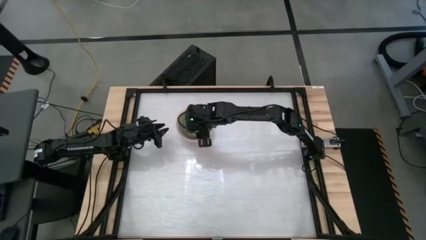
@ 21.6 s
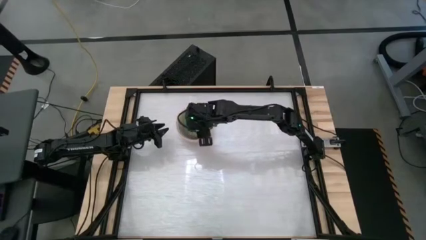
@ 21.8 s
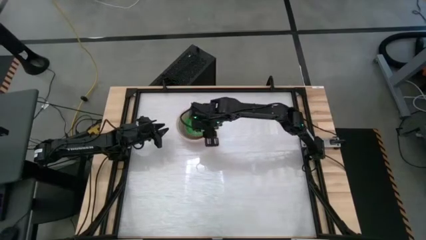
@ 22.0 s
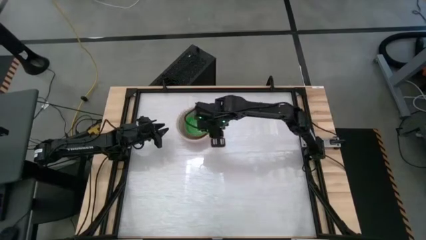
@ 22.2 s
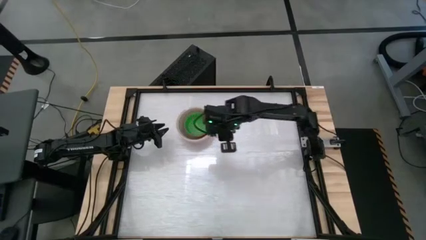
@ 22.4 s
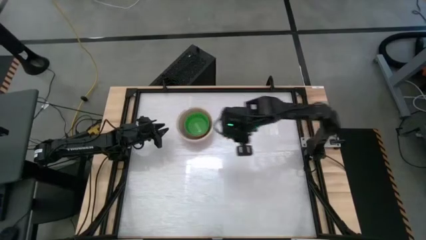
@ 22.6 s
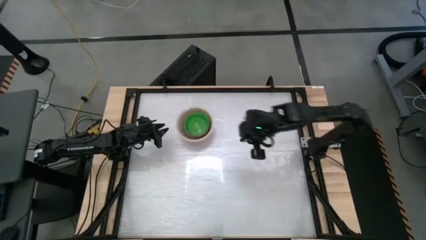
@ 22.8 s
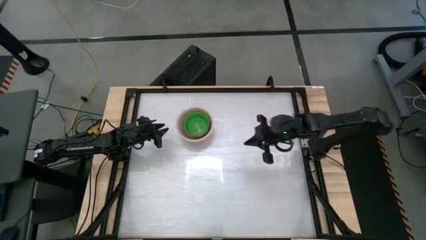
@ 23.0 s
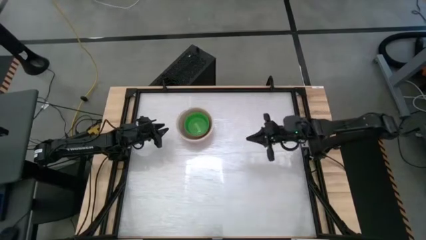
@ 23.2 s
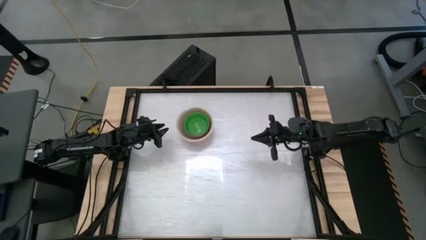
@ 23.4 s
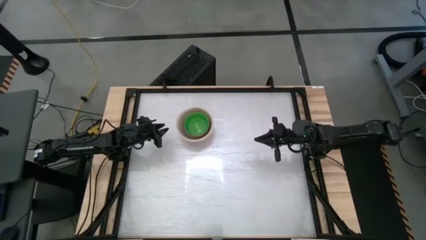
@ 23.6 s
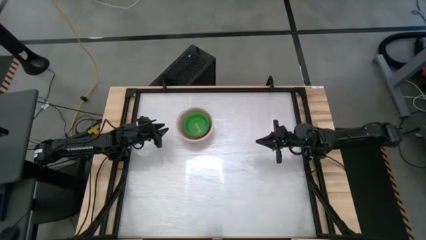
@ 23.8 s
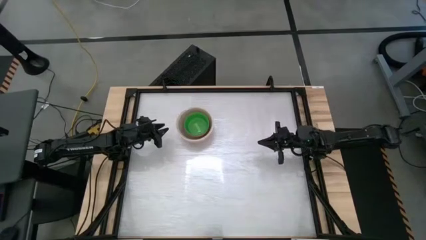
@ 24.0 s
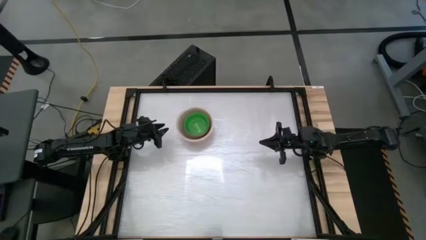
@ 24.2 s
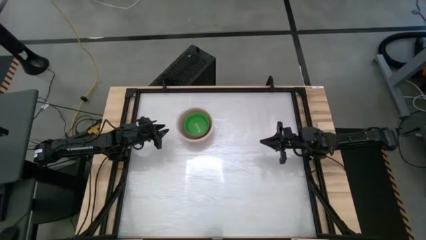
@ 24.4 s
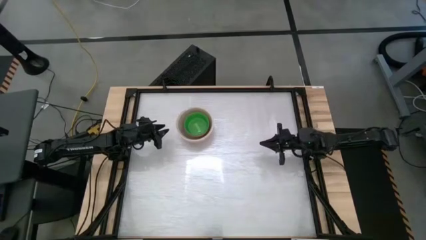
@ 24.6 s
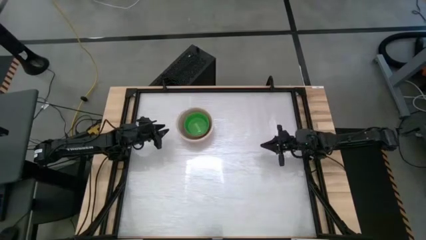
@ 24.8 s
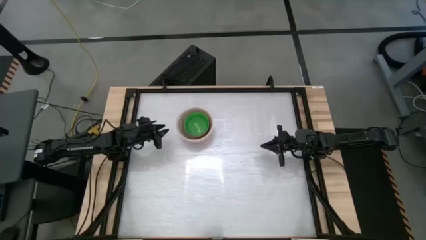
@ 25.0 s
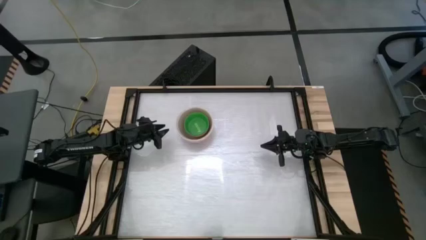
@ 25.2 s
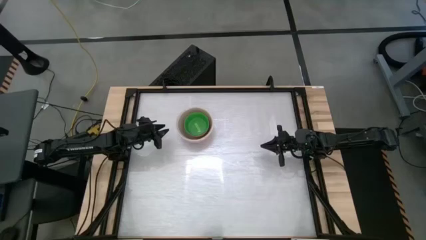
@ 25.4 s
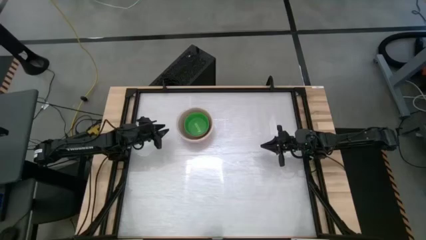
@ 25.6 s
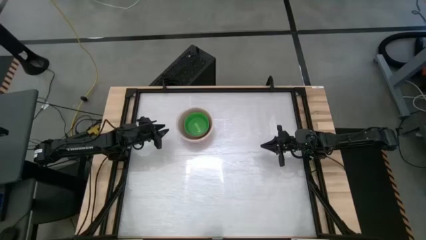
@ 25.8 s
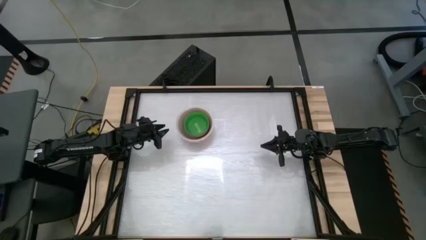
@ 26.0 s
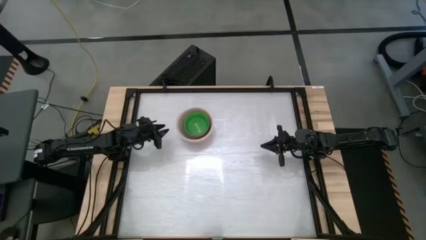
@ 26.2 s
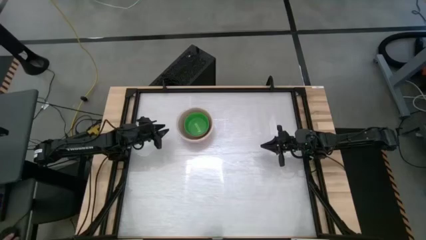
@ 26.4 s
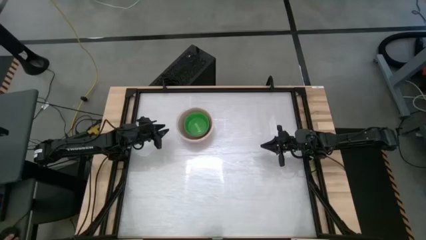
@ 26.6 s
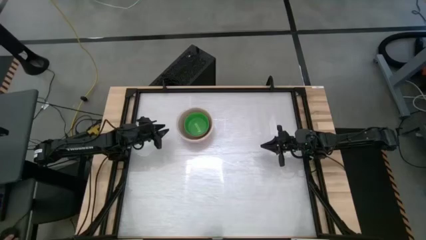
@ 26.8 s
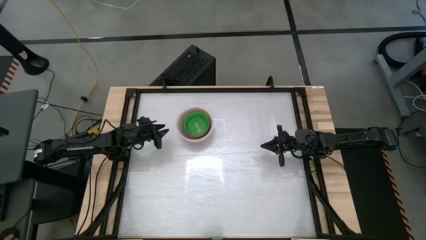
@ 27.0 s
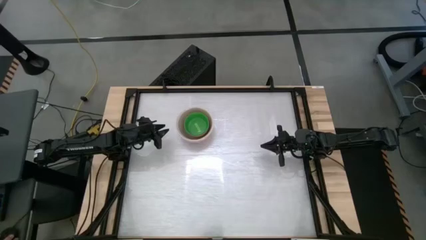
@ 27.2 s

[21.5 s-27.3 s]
Return to Home Position

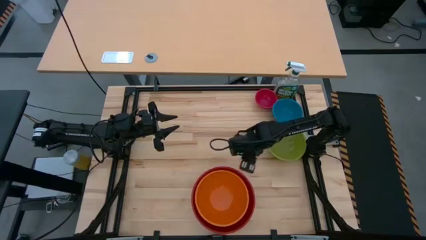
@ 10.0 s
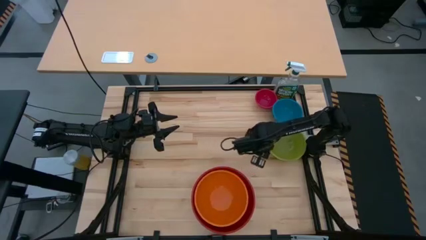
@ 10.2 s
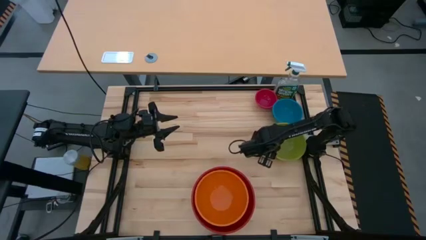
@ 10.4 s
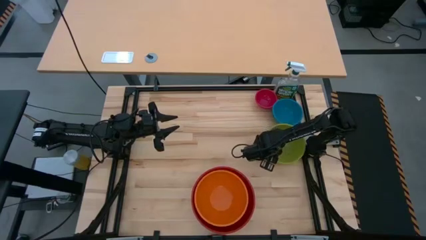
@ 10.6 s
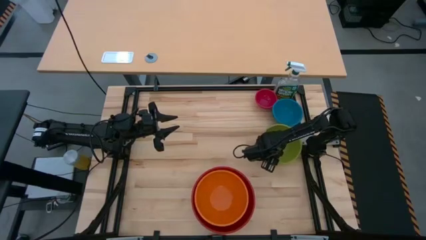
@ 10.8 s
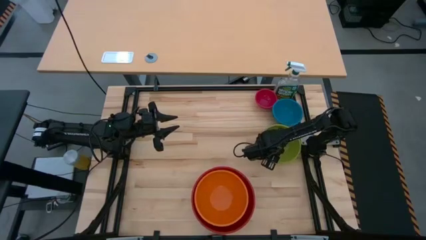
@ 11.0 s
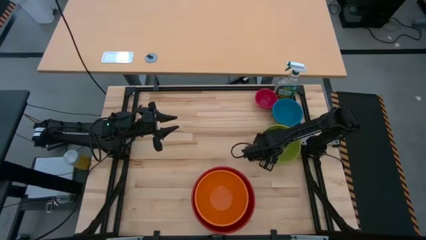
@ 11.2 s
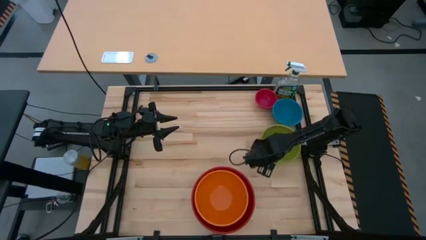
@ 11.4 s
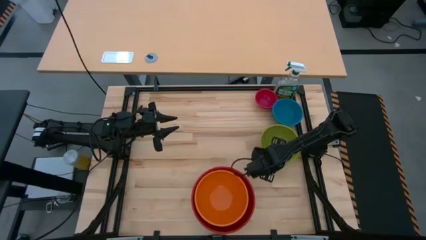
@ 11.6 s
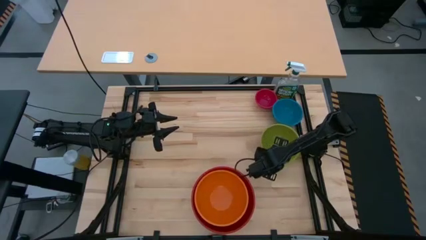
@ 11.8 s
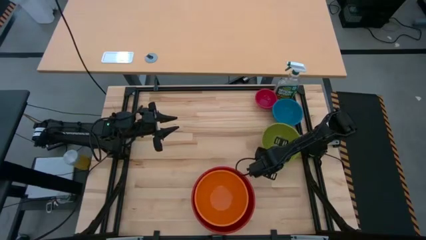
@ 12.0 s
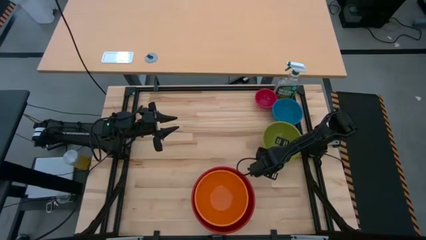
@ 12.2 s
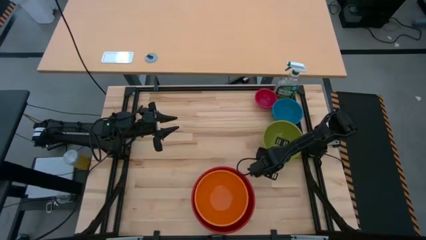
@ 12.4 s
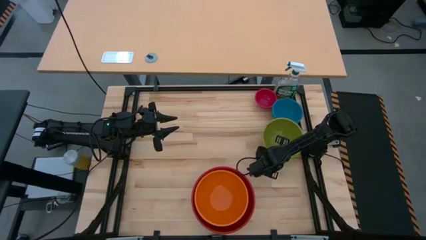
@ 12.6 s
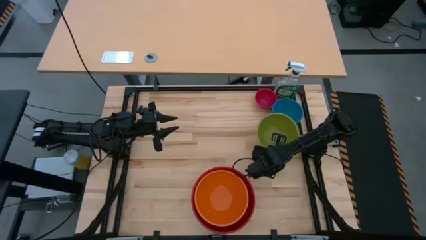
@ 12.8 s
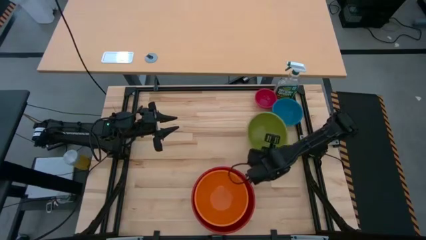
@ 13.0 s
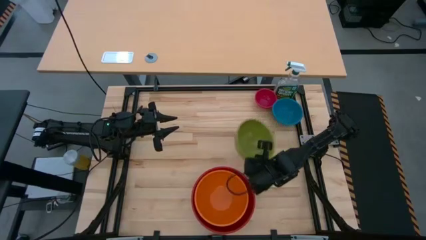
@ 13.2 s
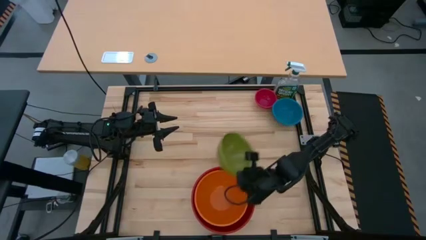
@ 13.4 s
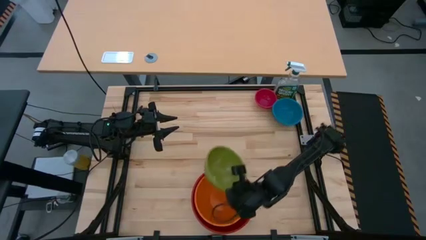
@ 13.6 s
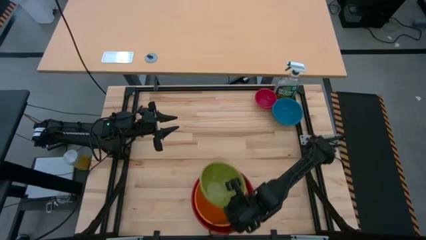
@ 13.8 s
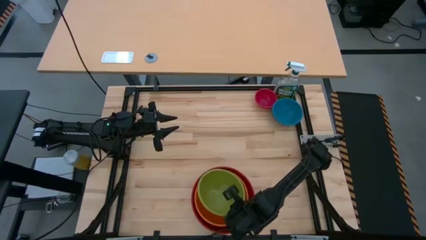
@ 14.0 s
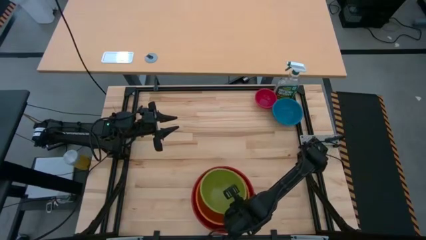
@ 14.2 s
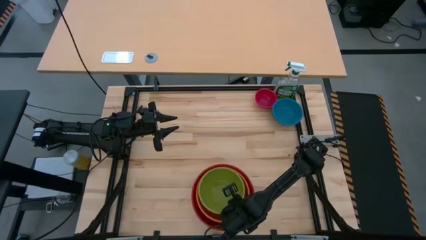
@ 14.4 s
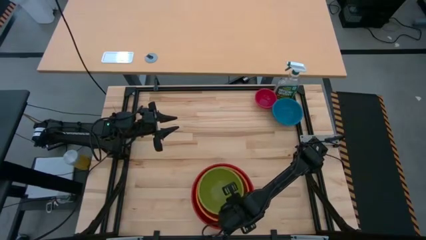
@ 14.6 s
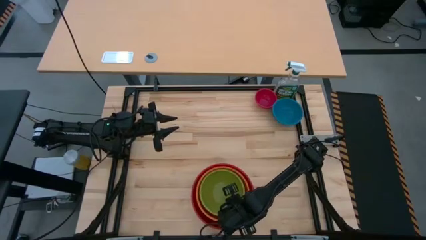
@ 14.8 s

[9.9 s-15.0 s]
Stack the green bowl on top of the orange bowl

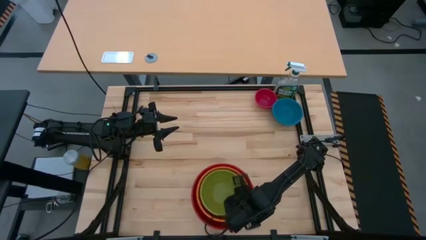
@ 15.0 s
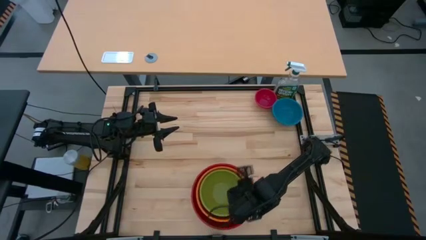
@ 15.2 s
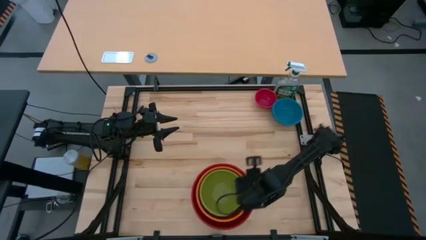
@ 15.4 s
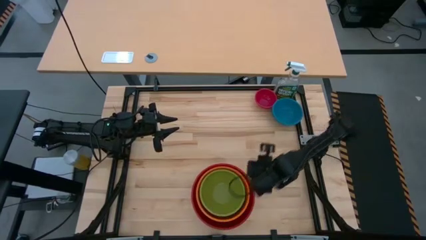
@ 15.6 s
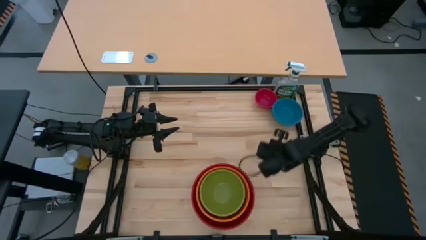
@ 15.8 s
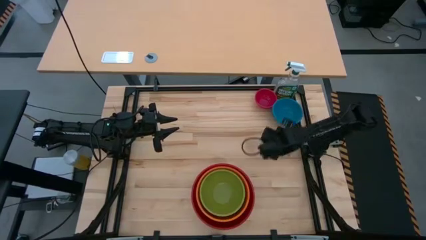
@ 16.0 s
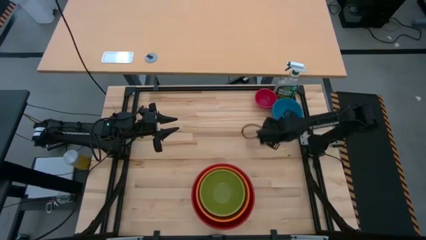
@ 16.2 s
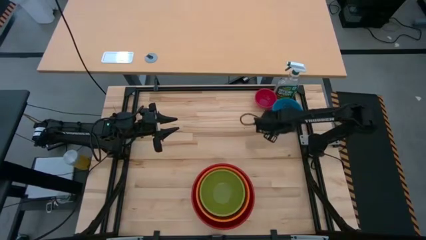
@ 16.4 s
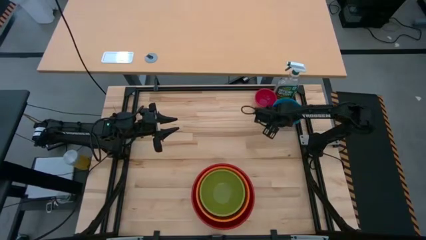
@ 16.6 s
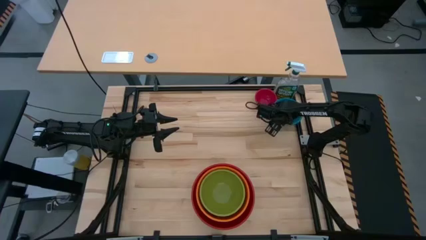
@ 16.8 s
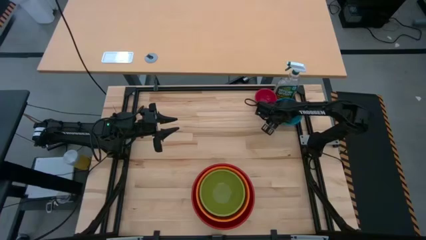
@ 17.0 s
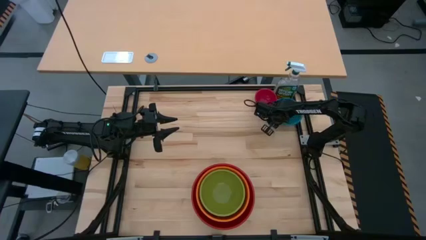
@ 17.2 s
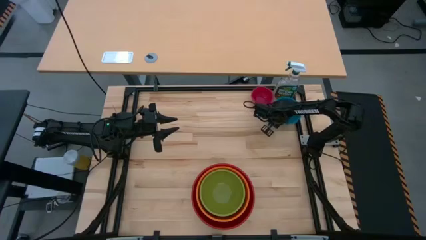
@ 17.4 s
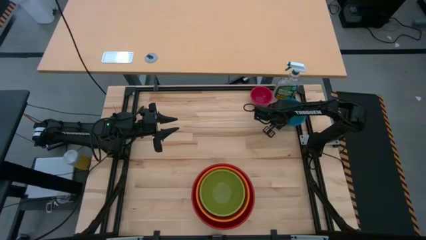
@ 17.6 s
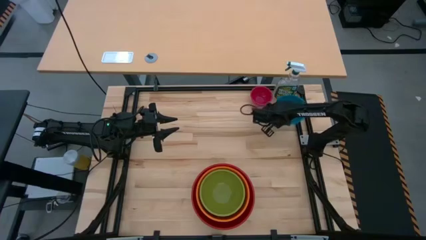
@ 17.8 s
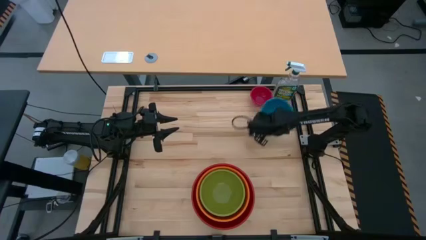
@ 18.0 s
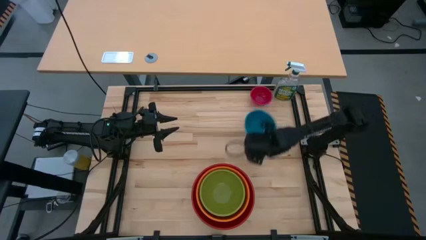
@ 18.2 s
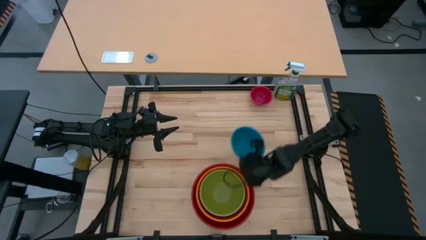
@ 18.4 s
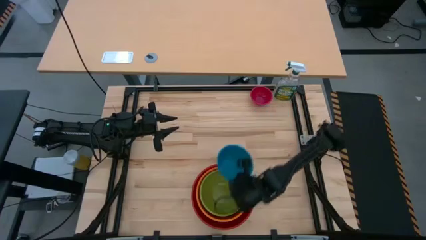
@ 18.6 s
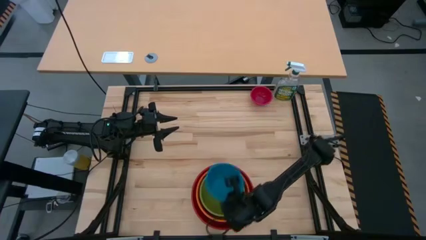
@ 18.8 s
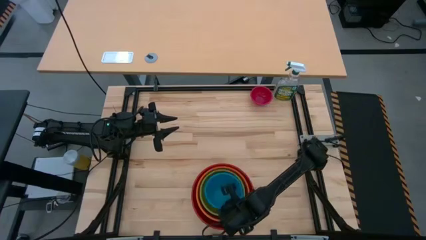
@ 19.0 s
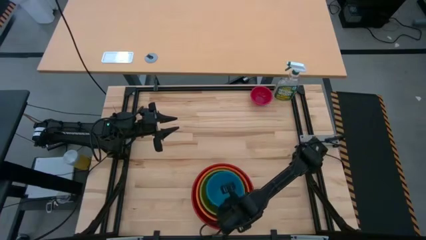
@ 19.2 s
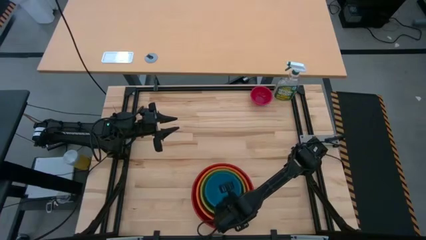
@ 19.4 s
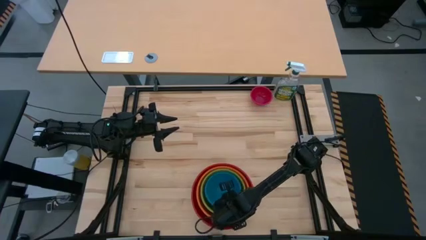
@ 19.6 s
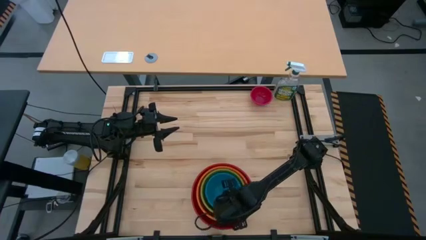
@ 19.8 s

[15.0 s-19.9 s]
Stack the blue bowl on top of the green bowl
